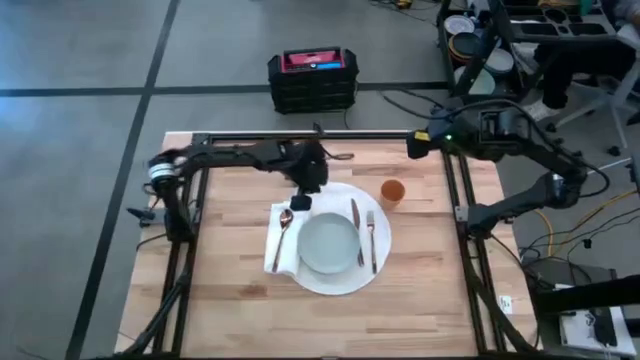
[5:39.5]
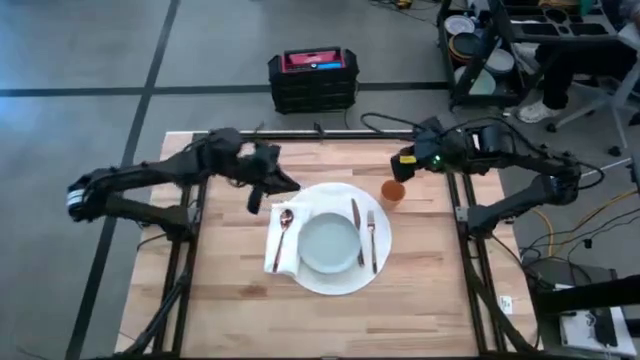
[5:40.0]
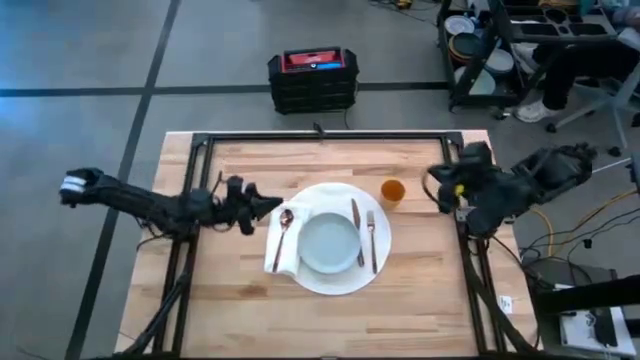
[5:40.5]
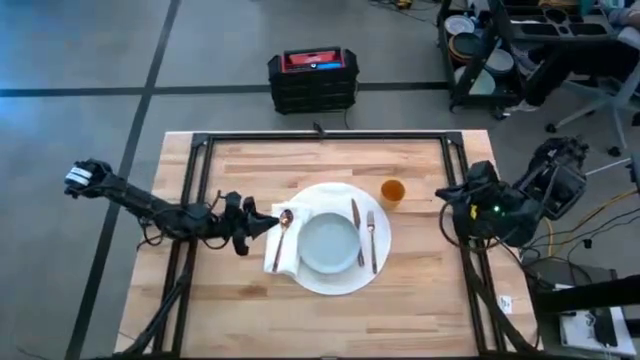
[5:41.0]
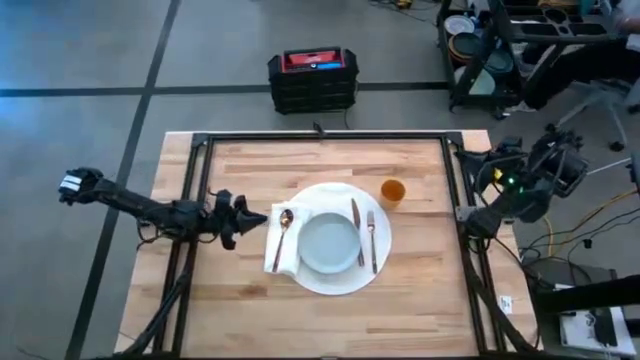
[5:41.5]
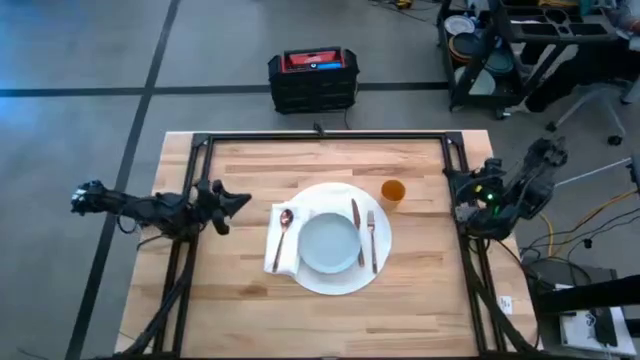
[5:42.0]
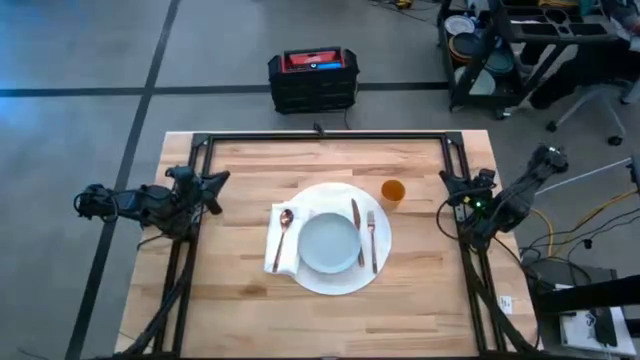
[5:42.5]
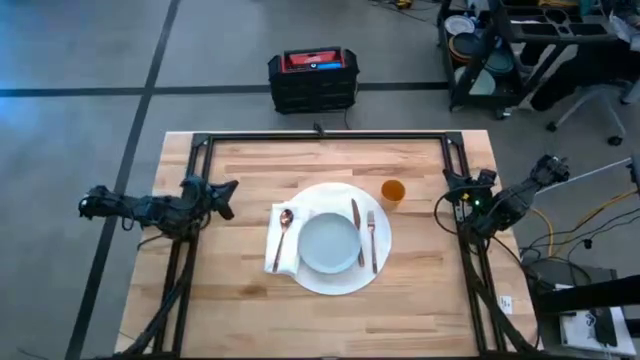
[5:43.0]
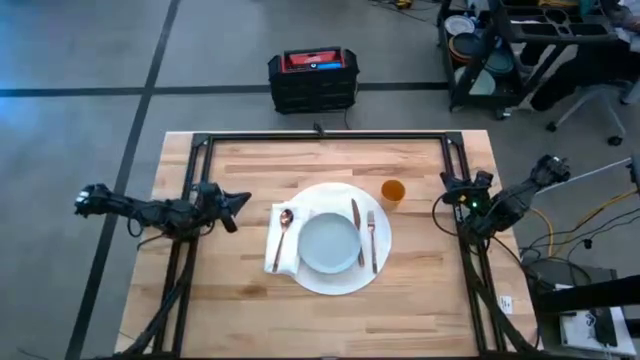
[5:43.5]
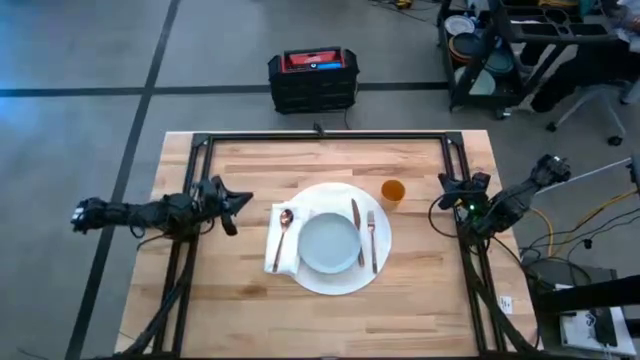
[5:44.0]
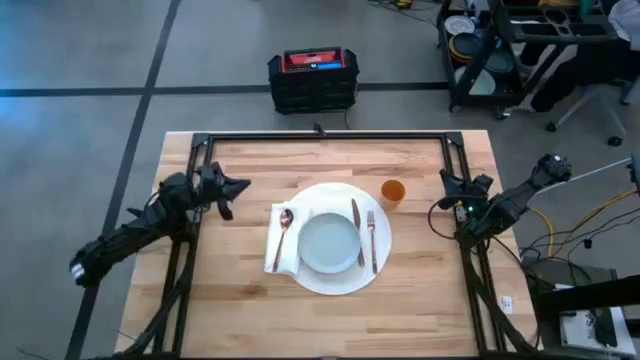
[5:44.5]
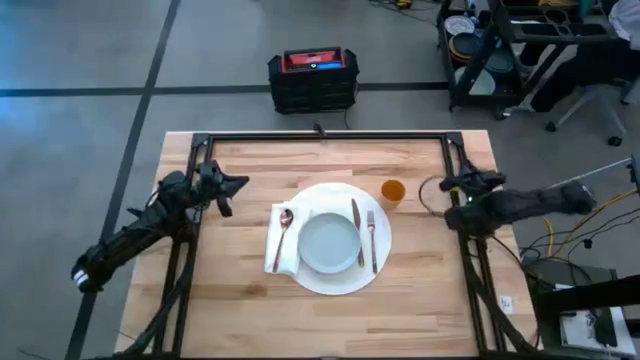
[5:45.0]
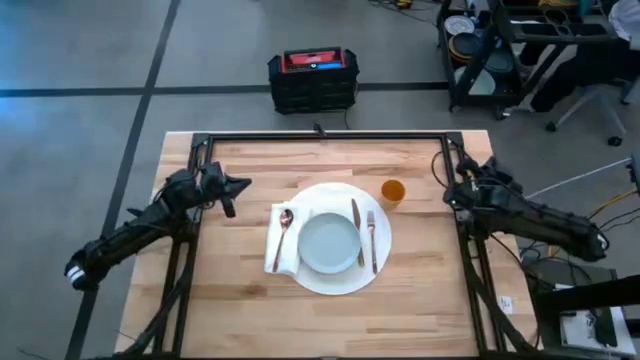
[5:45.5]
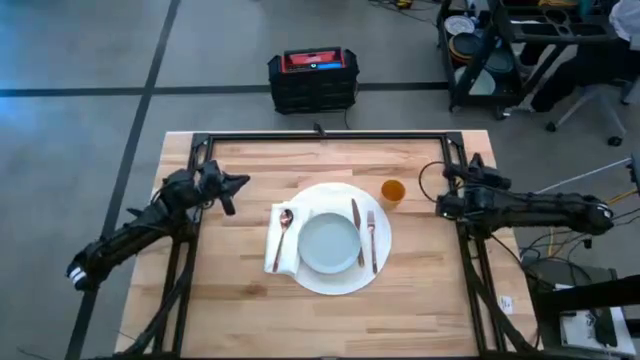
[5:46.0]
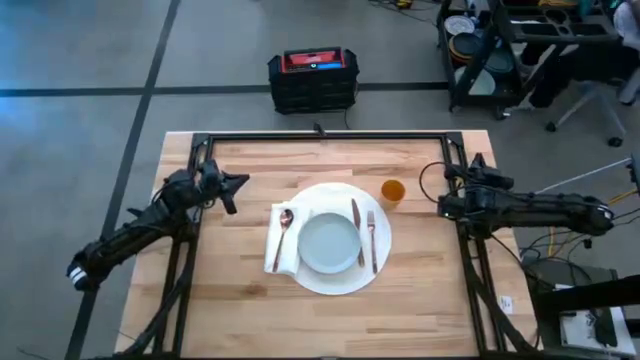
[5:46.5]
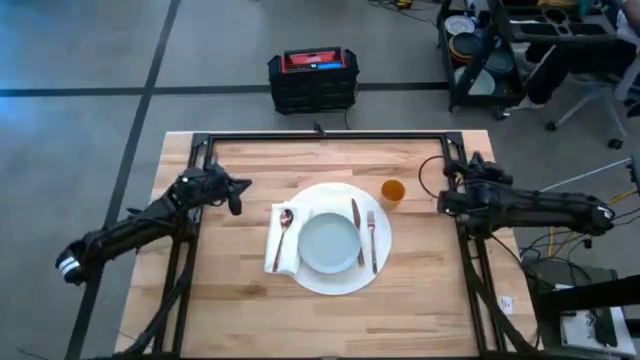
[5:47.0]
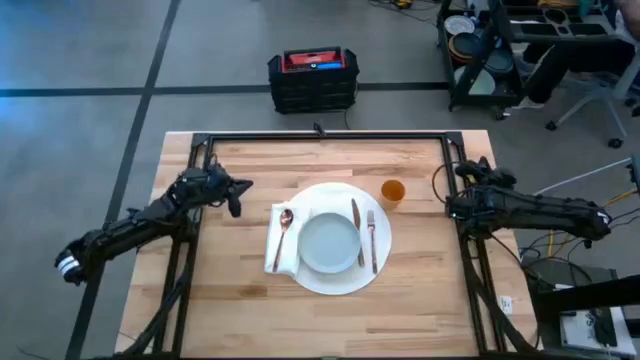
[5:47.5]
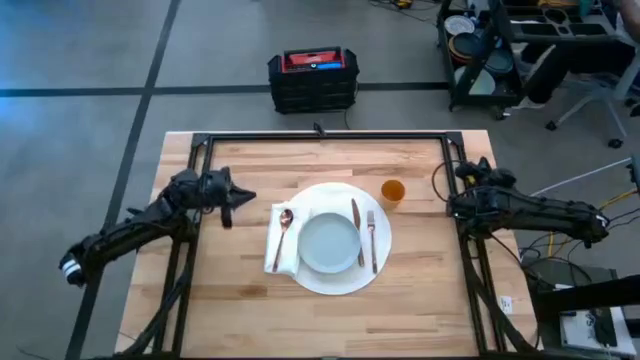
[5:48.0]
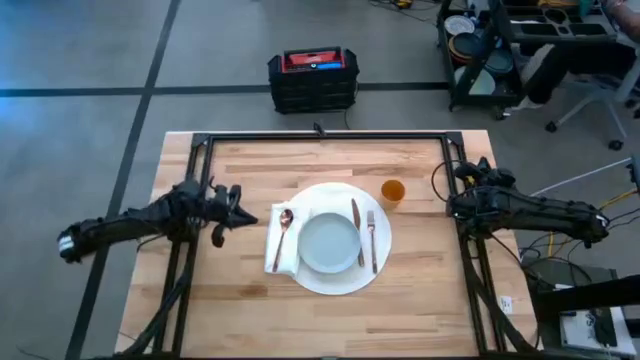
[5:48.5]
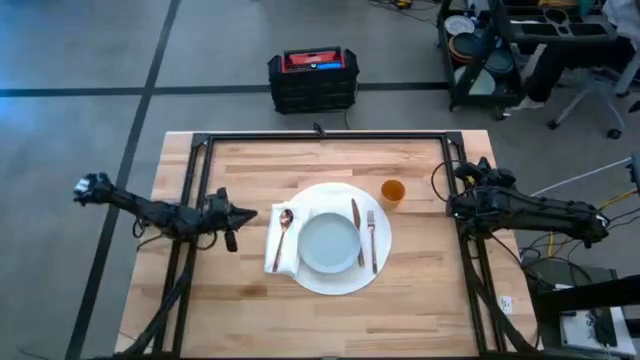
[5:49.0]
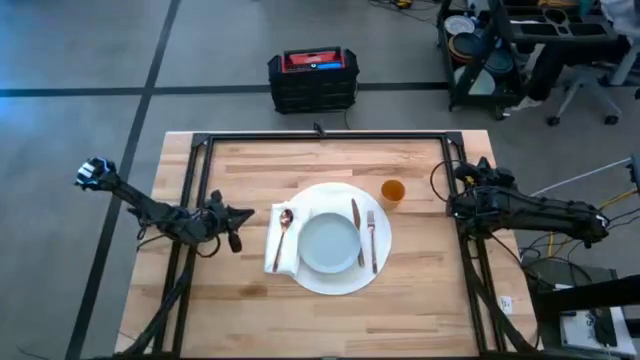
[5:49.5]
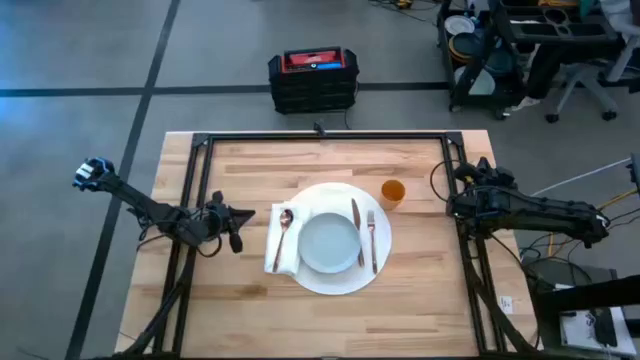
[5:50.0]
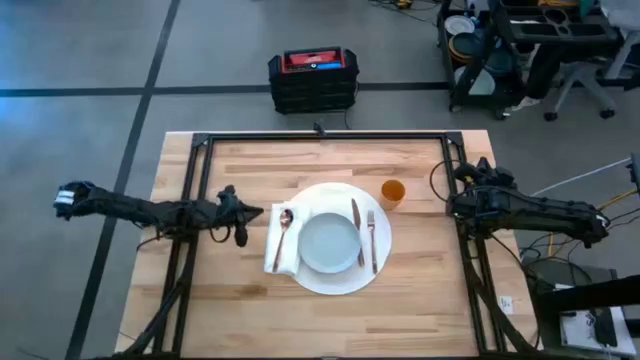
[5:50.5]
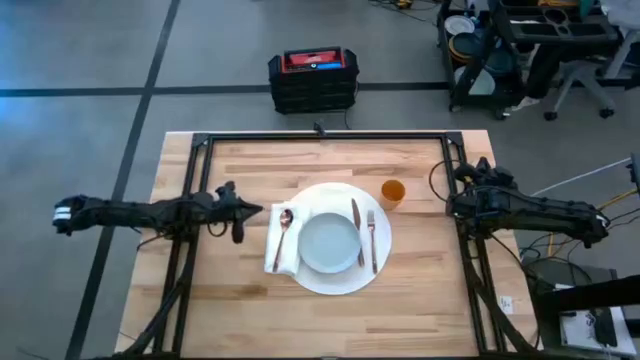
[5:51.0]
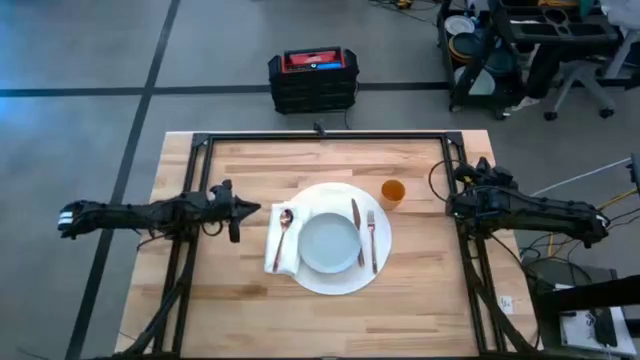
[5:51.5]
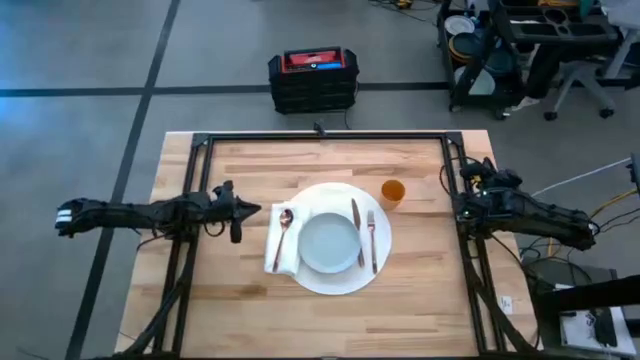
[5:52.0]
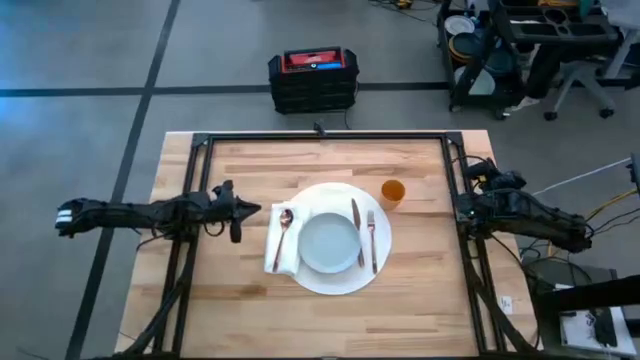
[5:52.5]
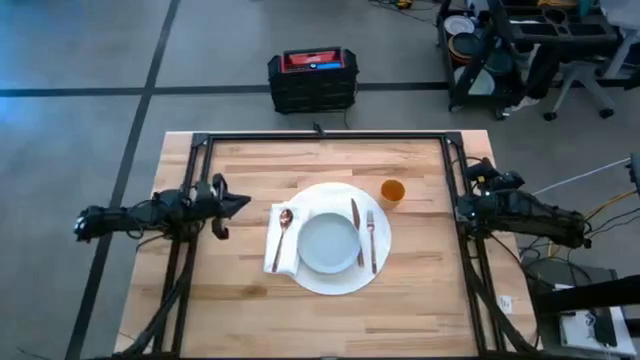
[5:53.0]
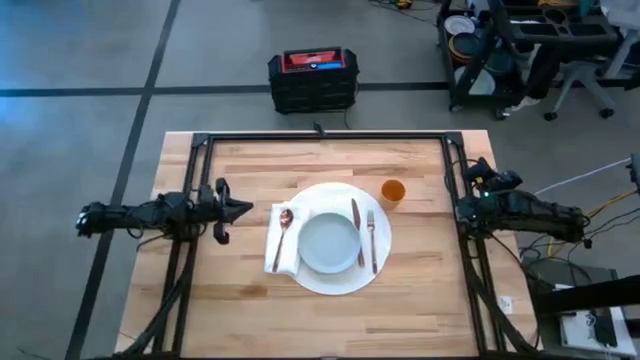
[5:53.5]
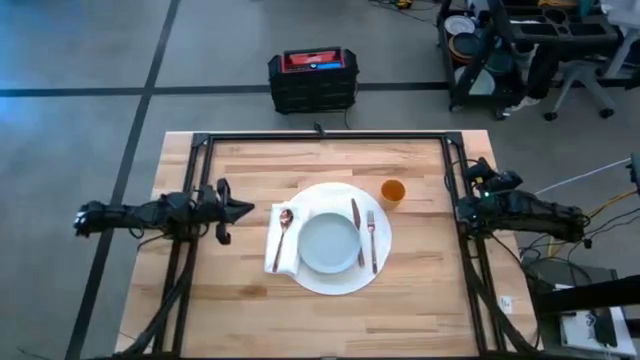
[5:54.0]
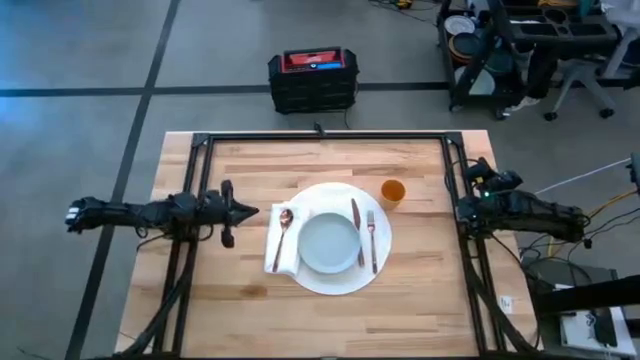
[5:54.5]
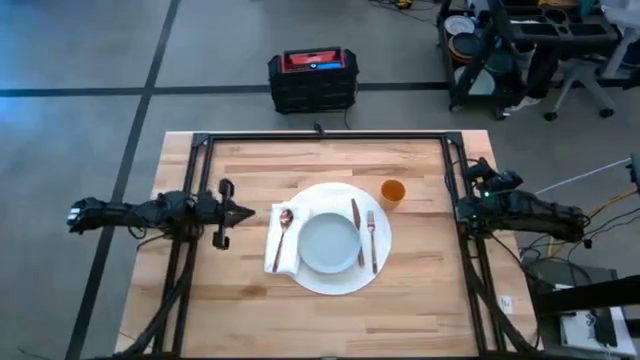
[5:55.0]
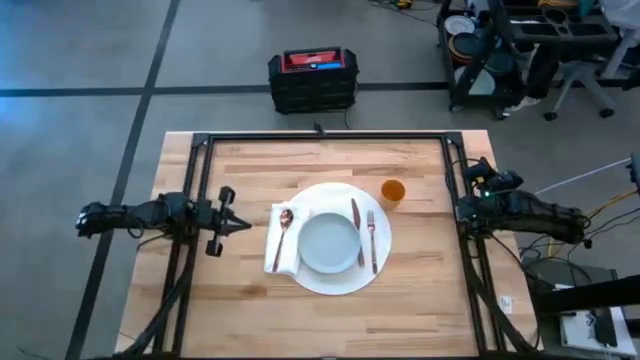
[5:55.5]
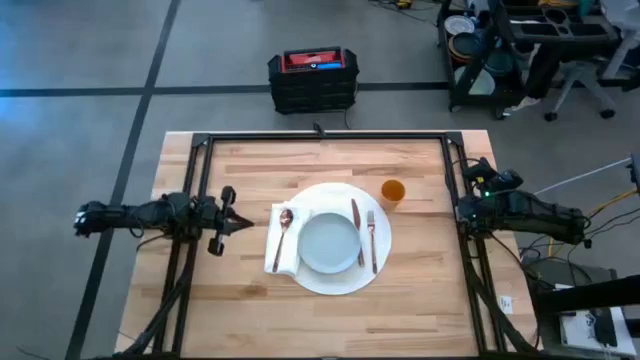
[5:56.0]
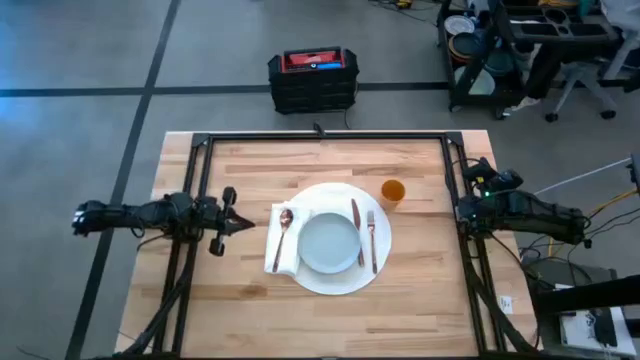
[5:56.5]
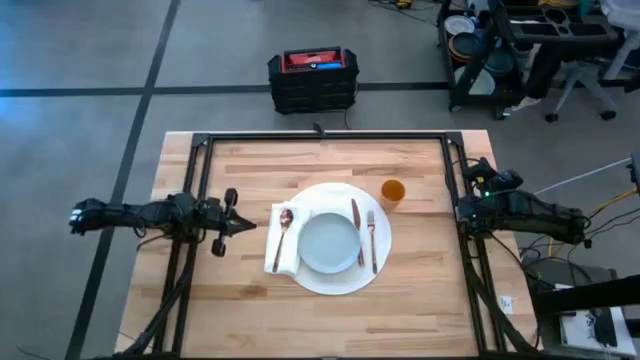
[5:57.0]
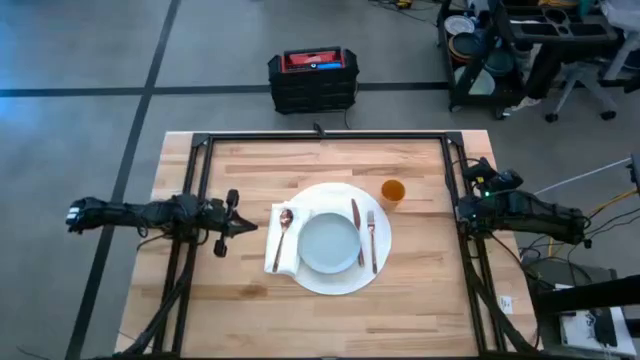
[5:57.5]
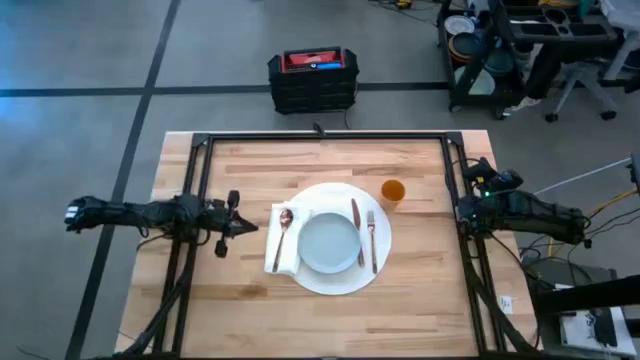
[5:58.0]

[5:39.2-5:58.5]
Task: Set table place
Return to Home Position

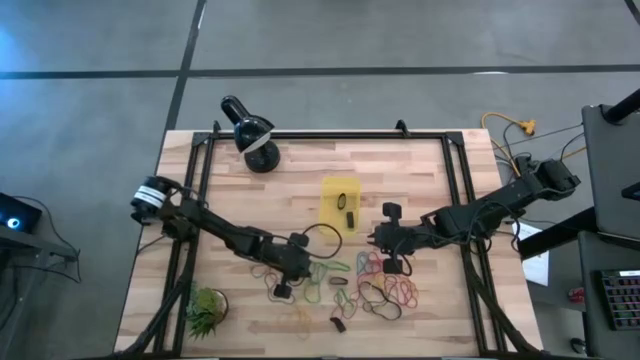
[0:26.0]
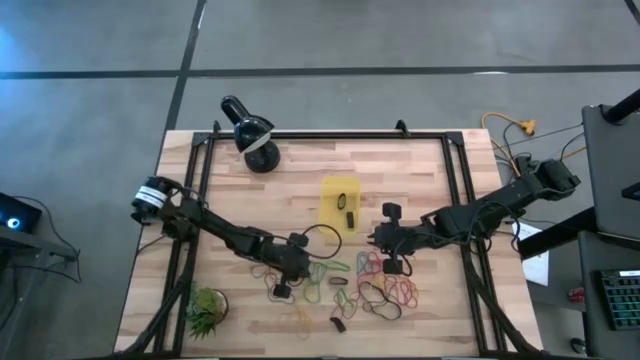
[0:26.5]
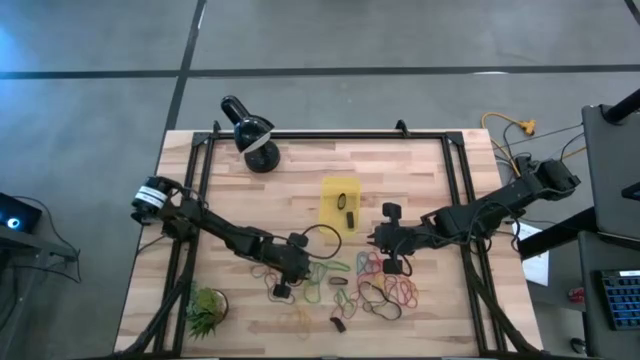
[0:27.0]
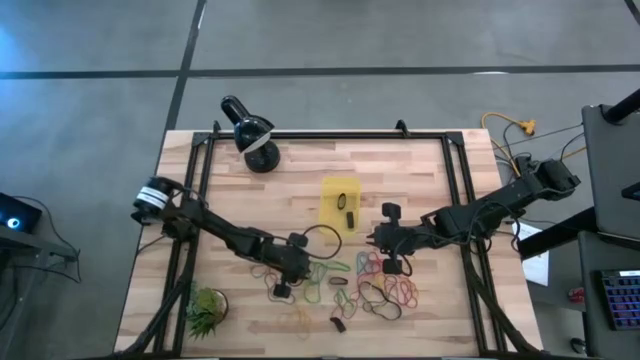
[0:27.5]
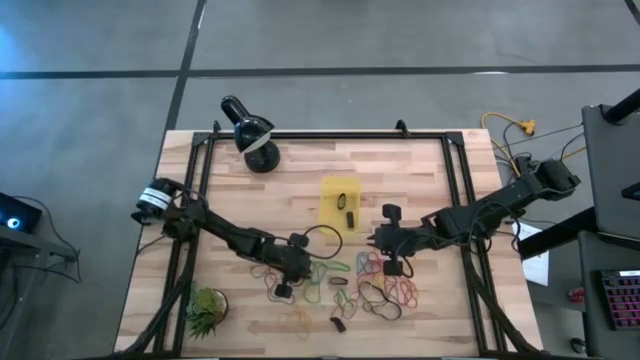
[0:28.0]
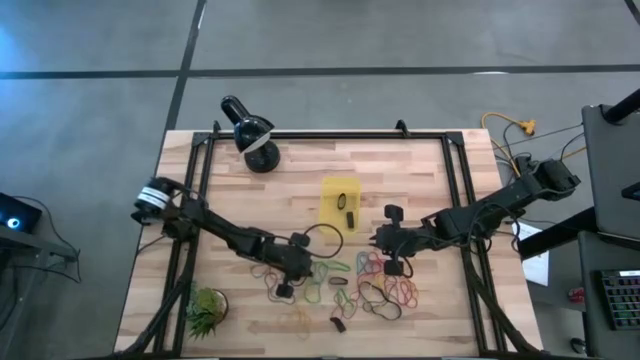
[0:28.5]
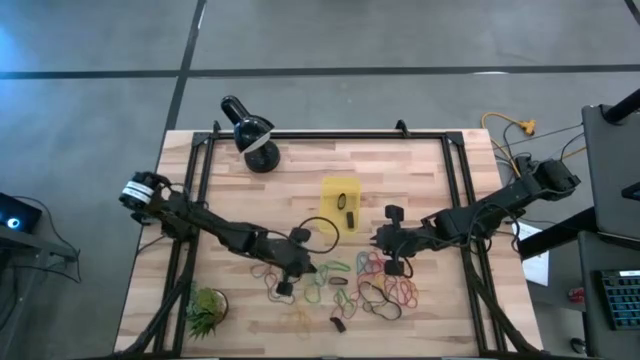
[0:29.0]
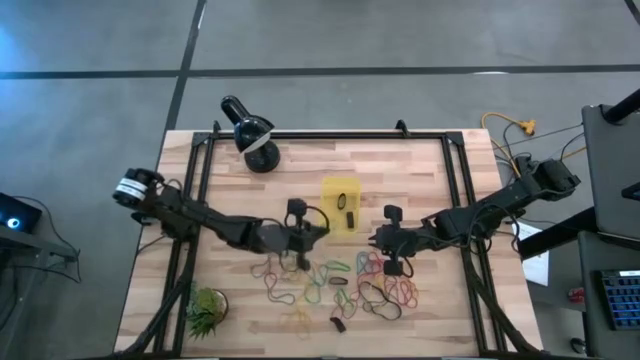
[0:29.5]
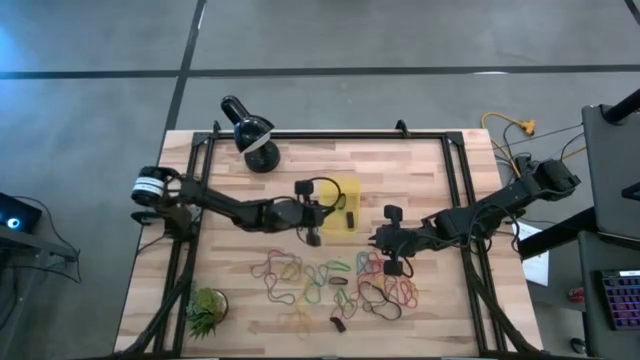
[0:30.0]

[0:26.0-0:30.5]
Task: Pick and place rubber bands into bin
Put the green rubber band into the yellow bin
